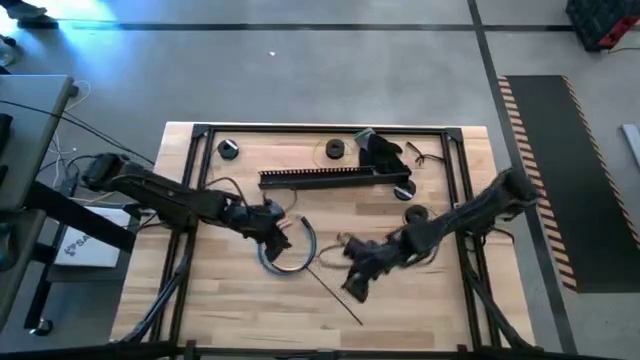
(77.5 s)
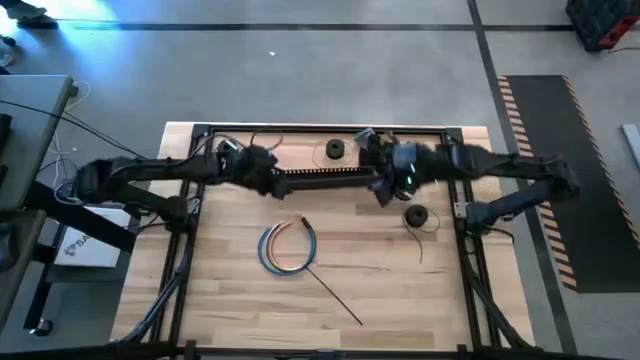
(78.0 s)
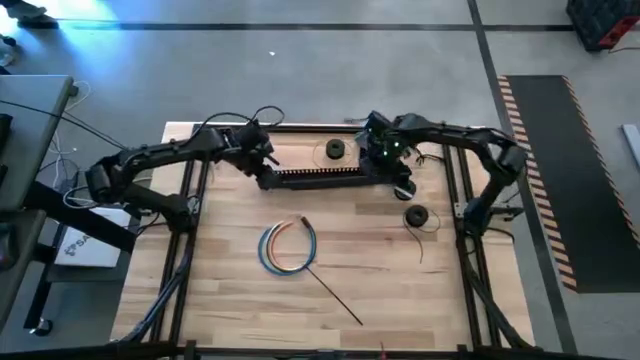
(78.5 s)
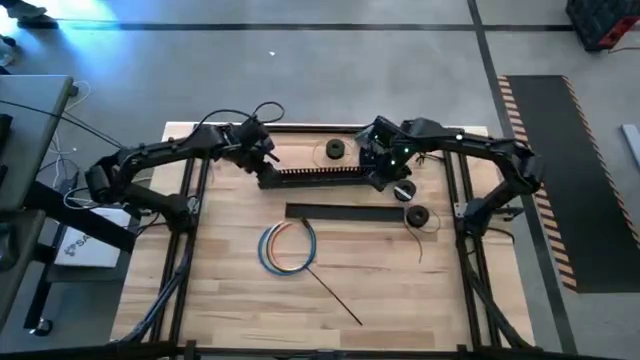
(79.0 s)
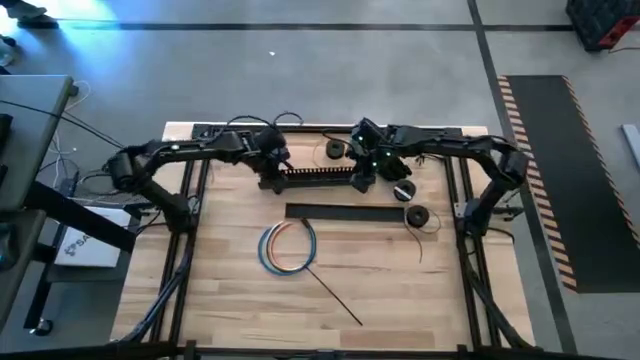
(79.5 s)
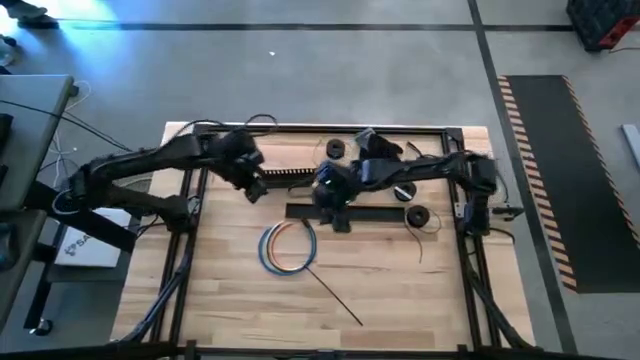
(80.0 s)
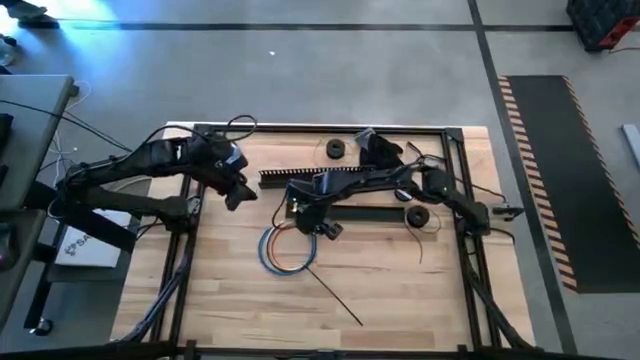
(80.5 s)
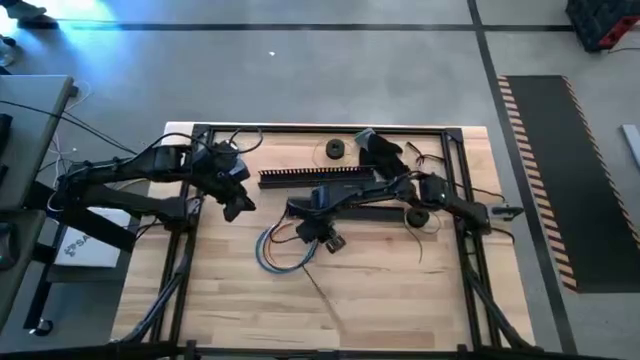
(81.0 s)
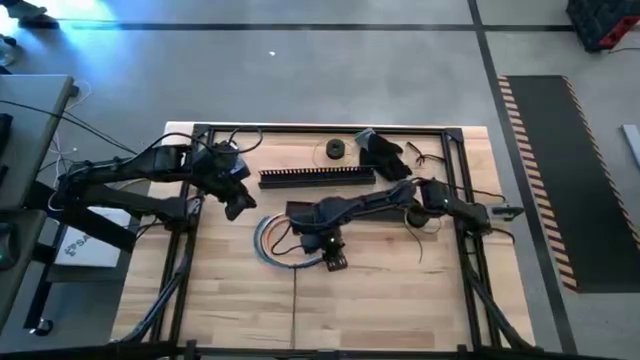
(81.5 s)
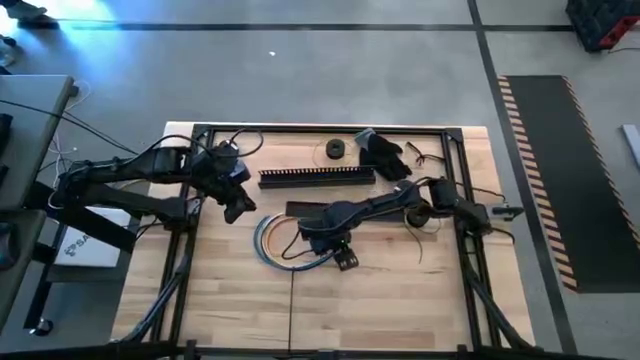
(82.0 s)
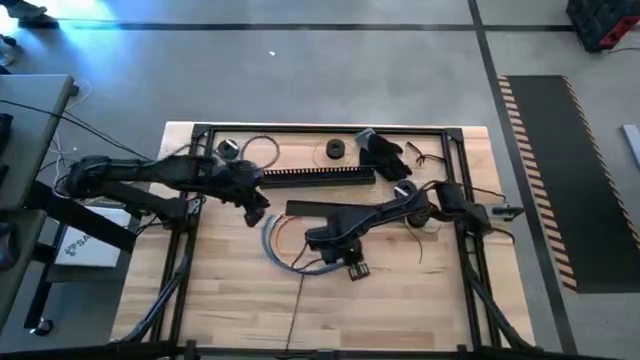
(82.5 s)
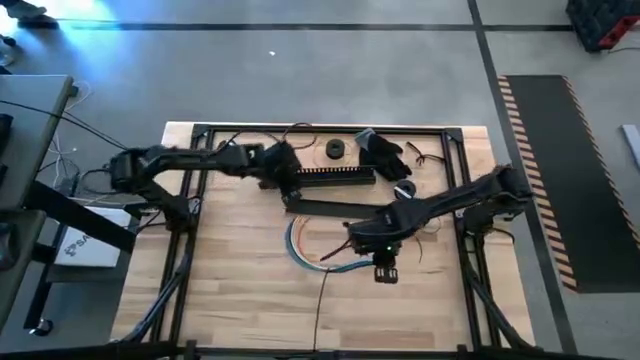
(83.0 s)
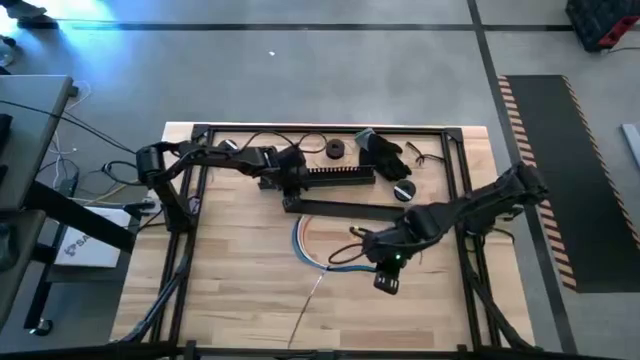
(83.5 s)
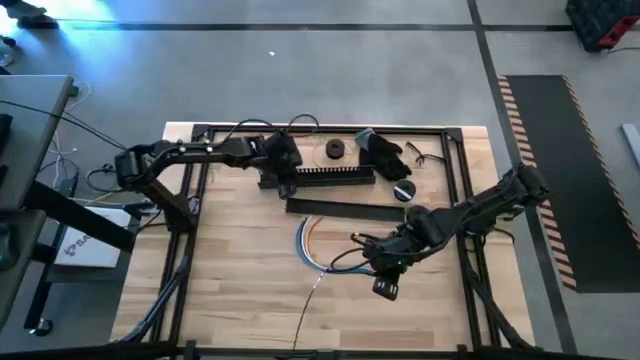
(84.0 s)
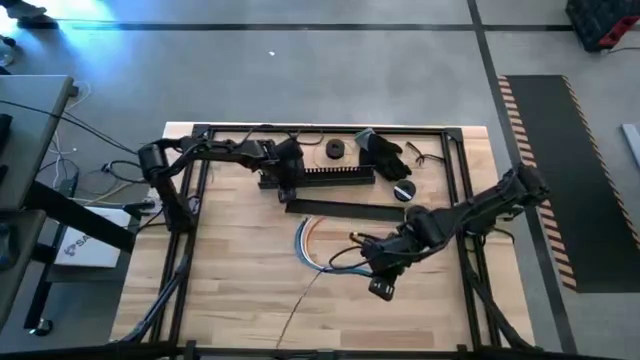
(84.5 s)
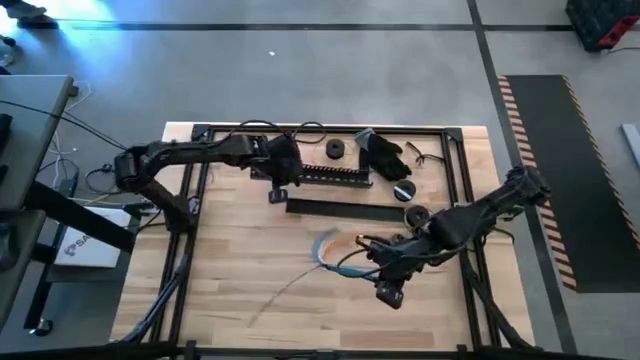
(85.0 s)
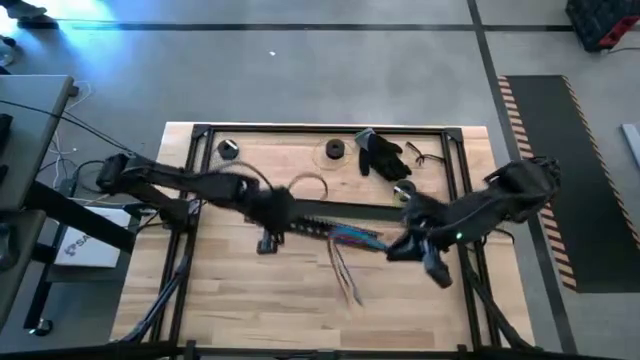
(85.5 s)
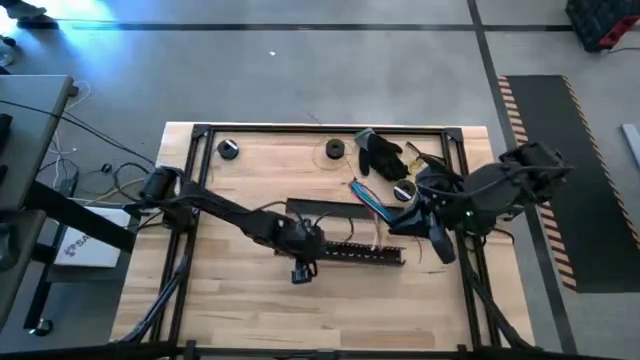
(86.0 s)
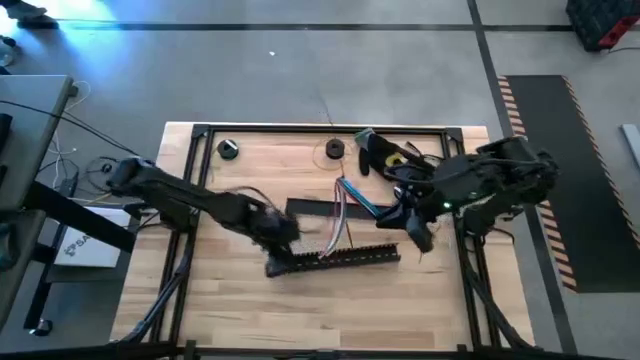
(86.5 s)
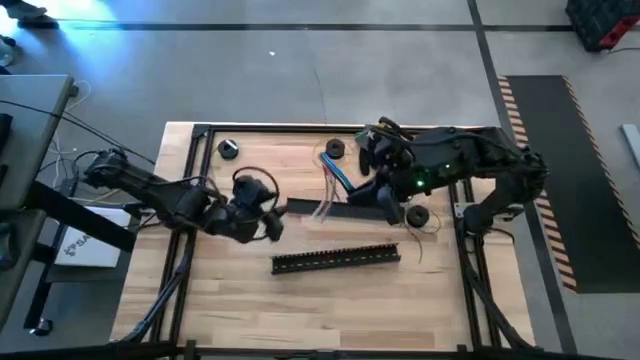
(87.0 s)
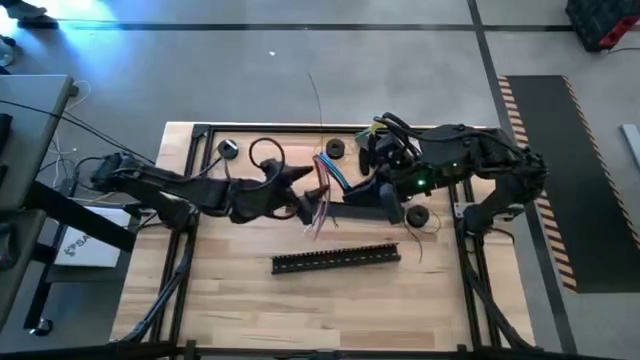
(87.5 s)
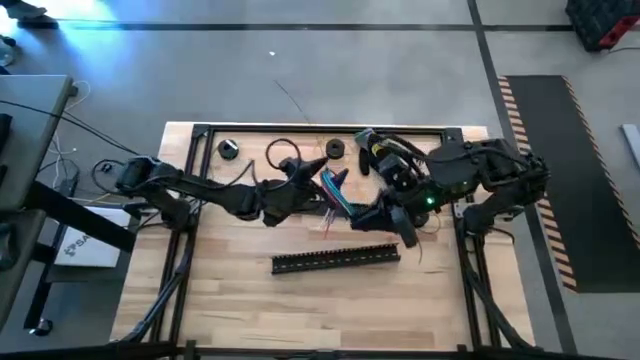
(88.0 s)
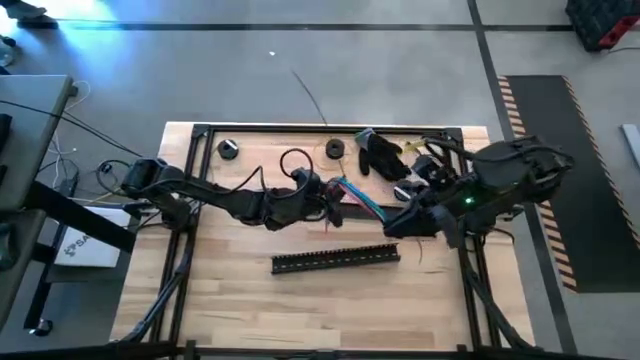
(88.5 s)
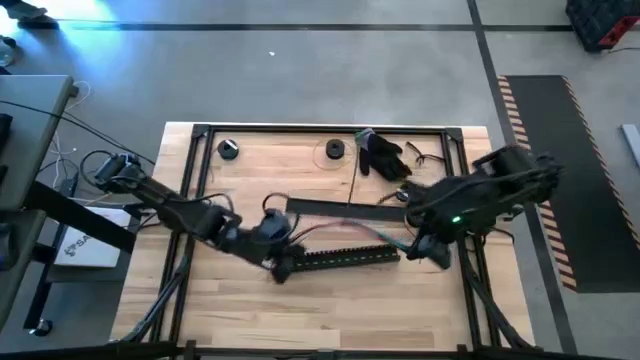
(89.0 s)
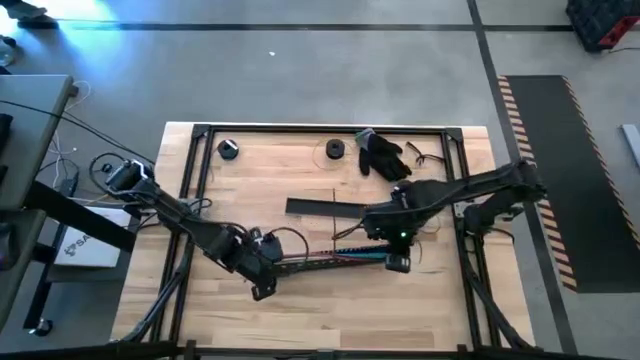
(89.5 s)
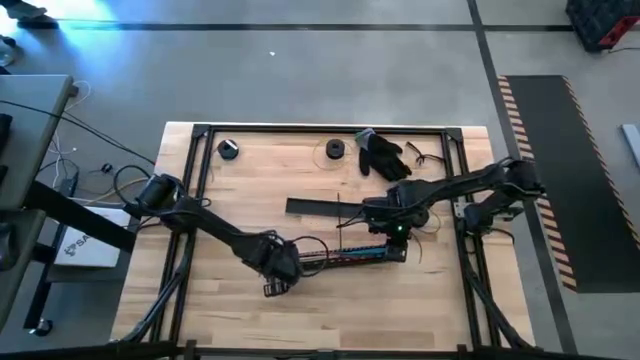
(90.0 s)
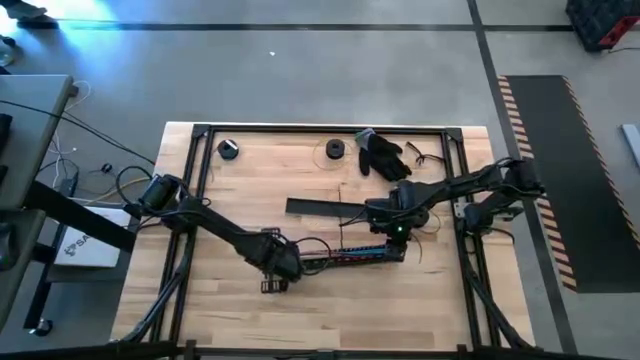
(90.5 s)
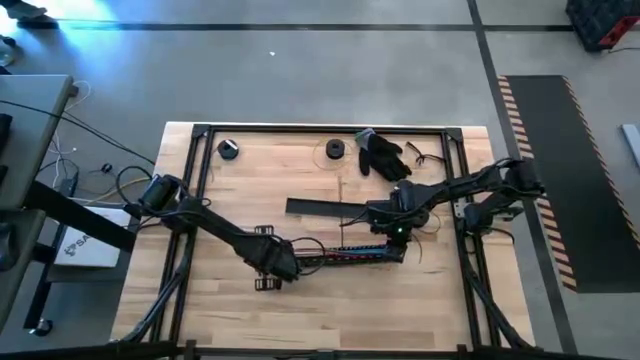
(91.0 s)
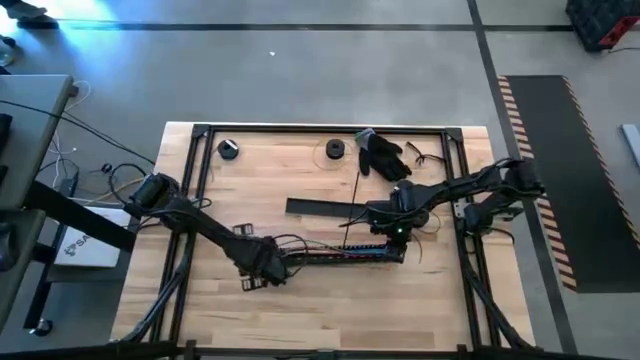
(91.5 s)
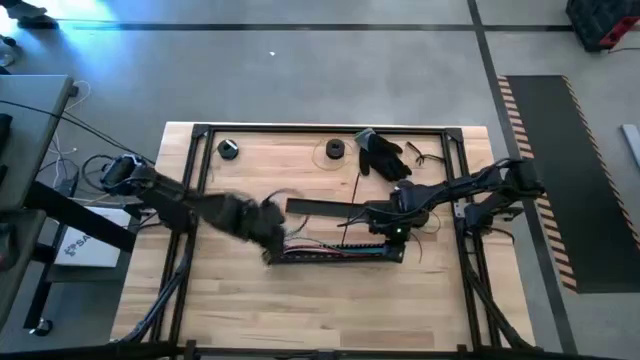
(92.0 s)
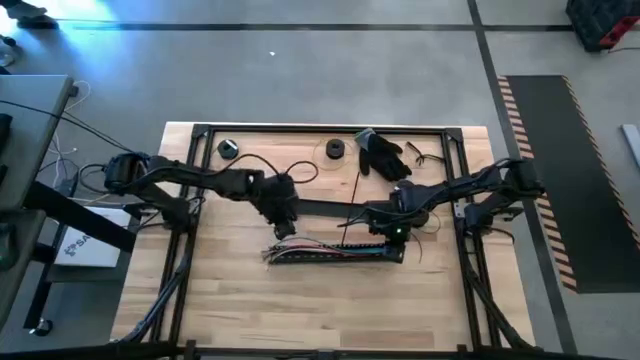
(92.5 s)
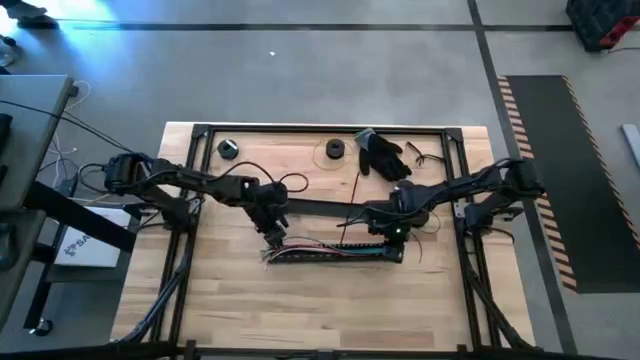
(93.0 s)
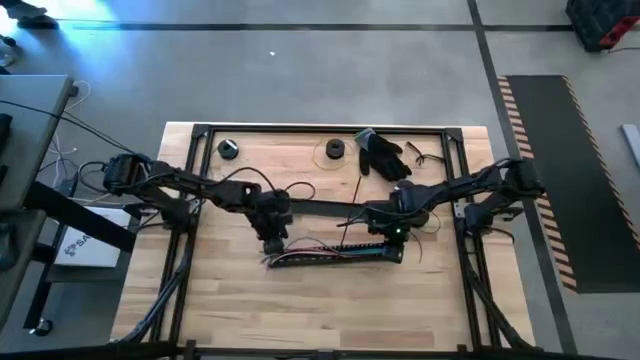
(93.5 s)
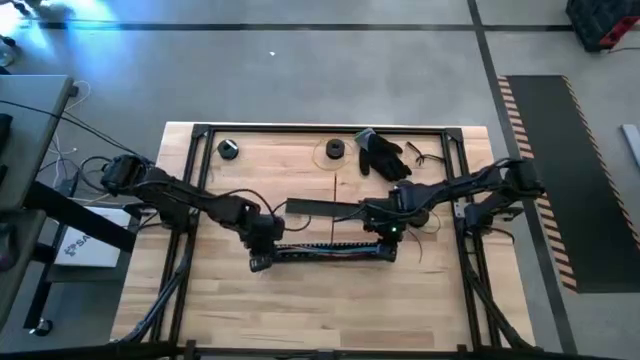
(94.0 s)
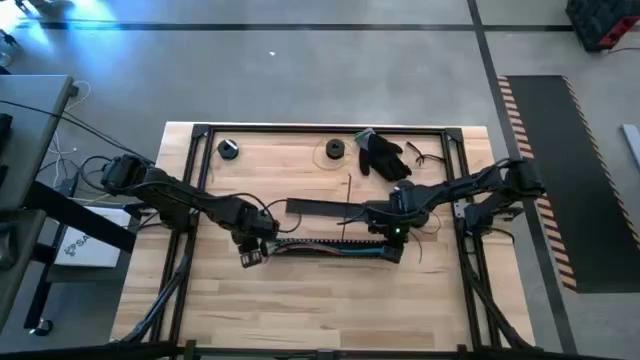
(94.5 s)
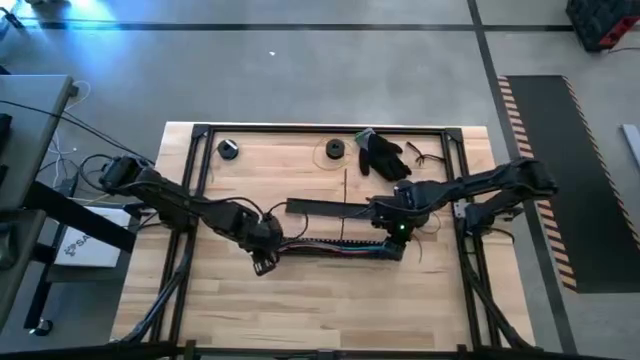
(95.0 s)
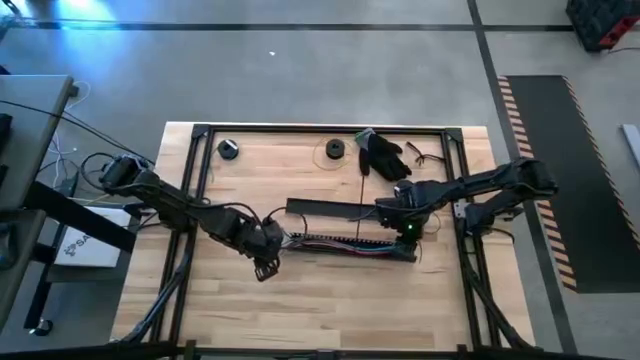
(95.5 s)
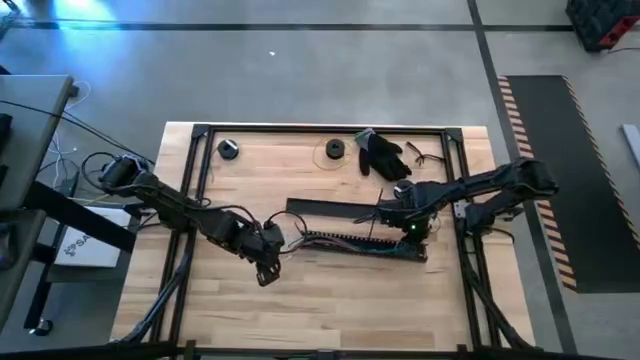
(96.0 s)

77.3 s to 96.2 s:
Task: Ziptie cables
Put the ziptied cables into the black cable duct

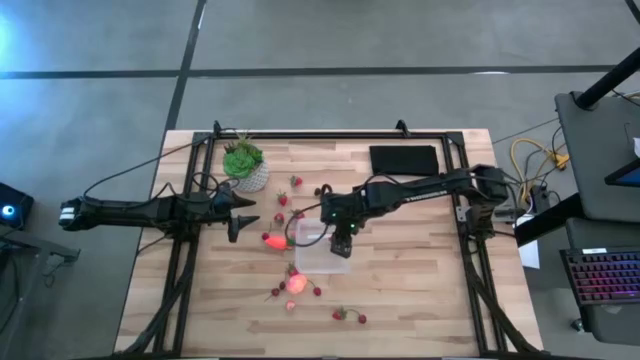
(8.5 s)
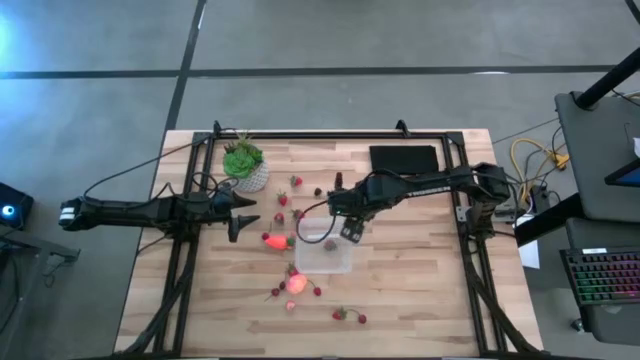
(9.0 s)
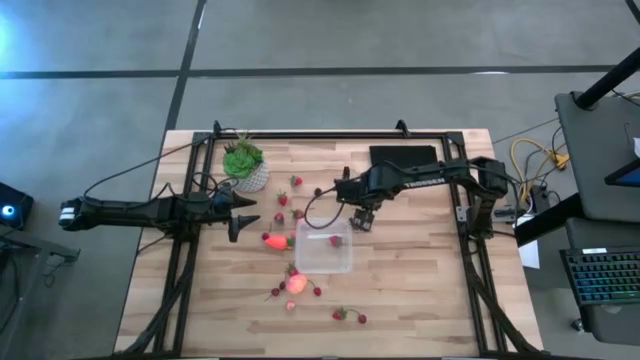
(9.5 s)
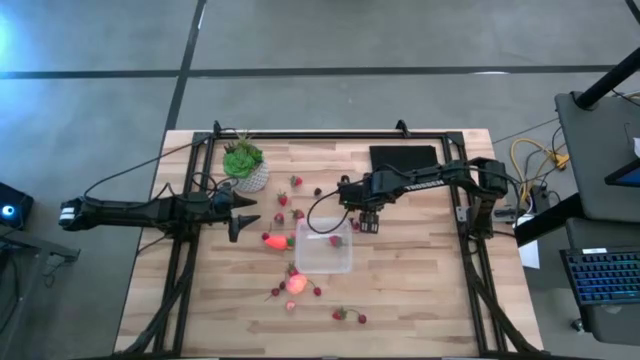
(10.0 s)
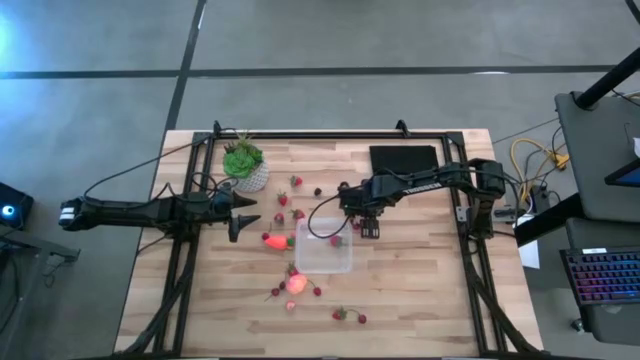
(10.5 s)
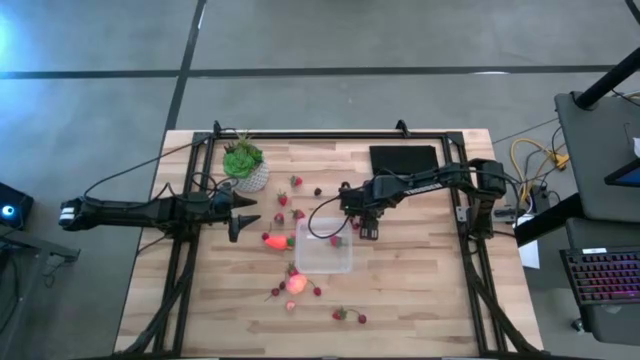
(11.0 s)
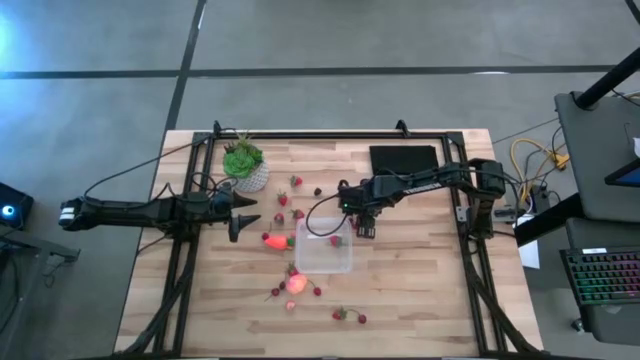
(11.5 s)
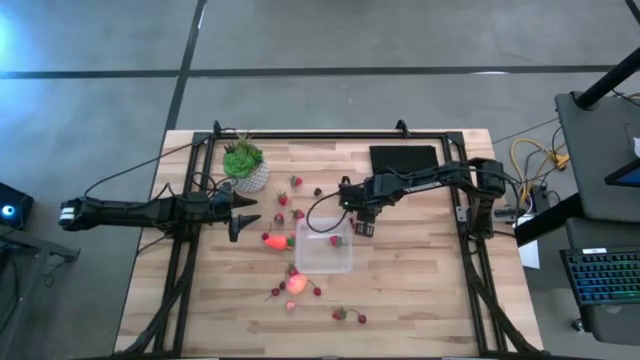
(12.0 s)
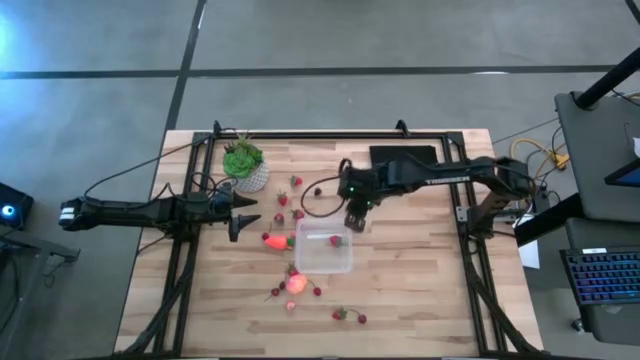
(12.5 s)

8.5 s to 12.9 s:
Task: Pick and placing Produce into tupperware
Put the red cherry into the transparent container
